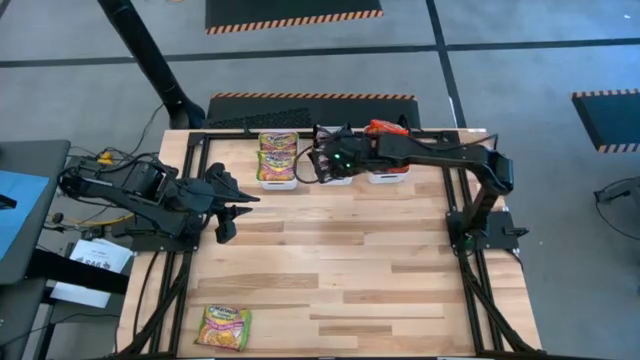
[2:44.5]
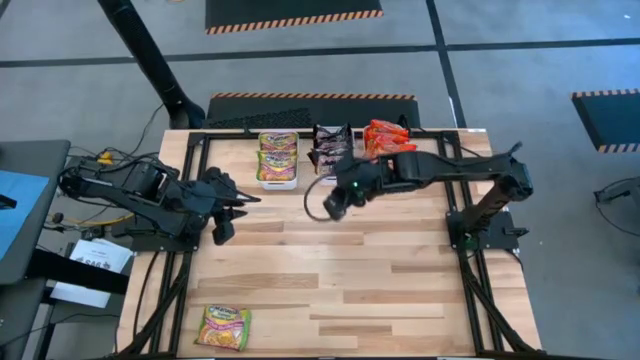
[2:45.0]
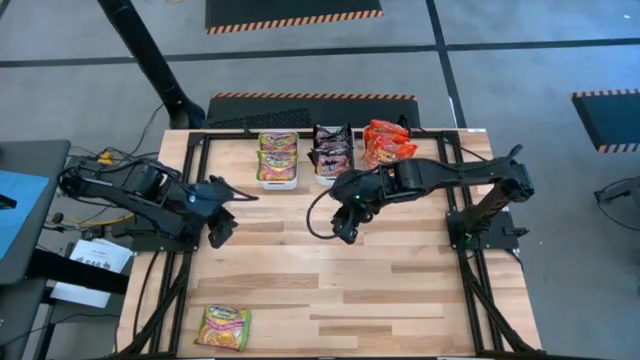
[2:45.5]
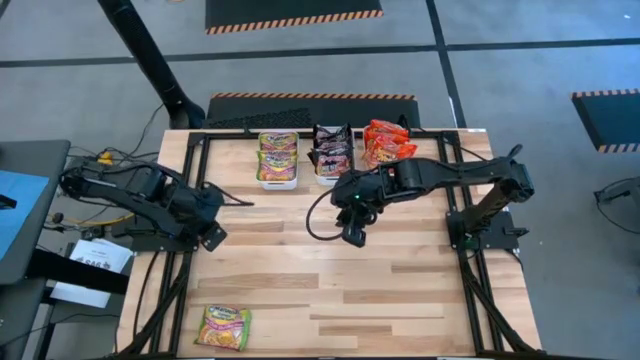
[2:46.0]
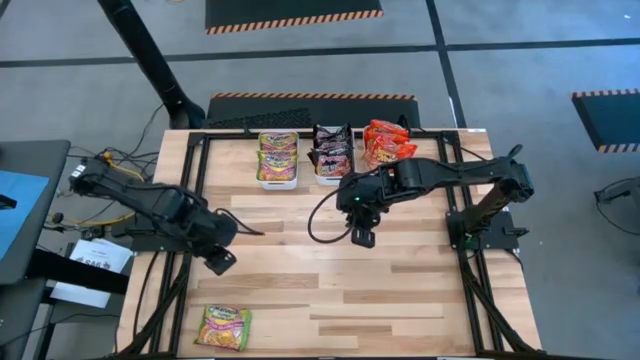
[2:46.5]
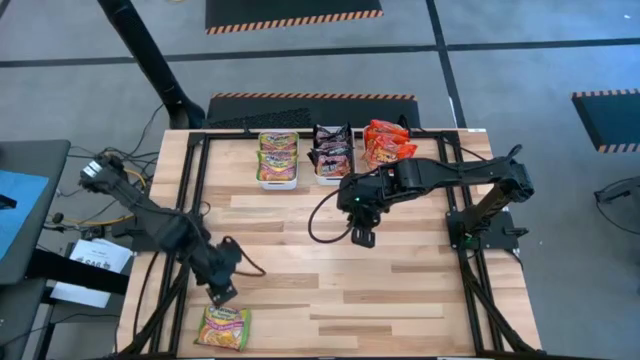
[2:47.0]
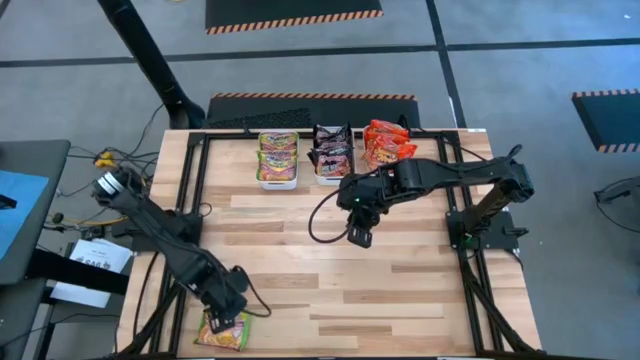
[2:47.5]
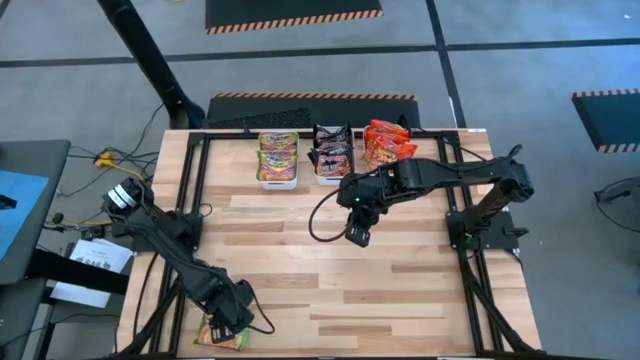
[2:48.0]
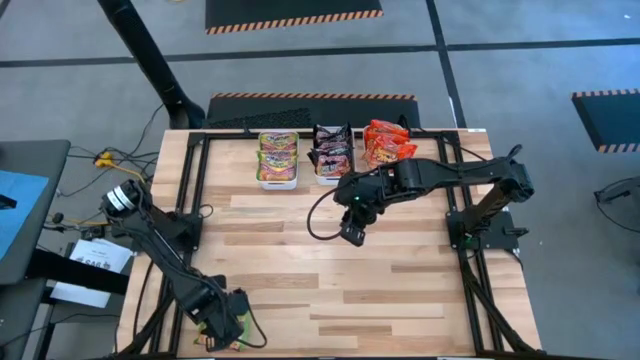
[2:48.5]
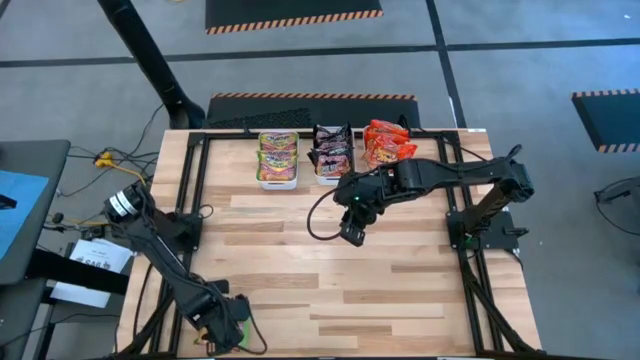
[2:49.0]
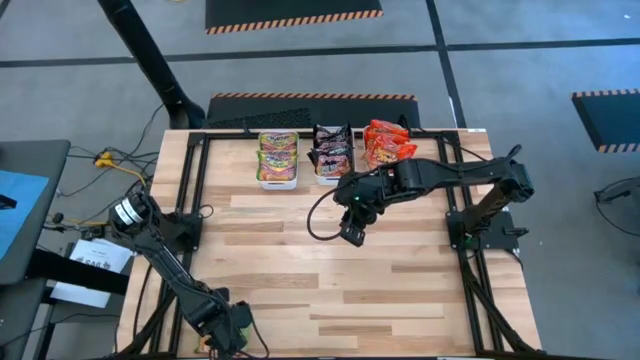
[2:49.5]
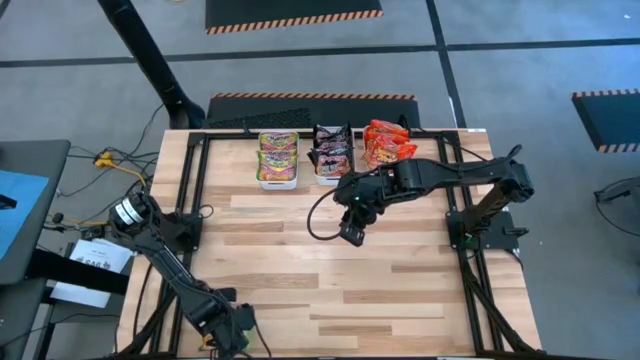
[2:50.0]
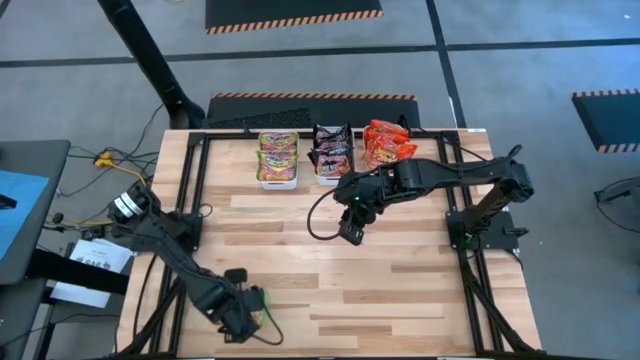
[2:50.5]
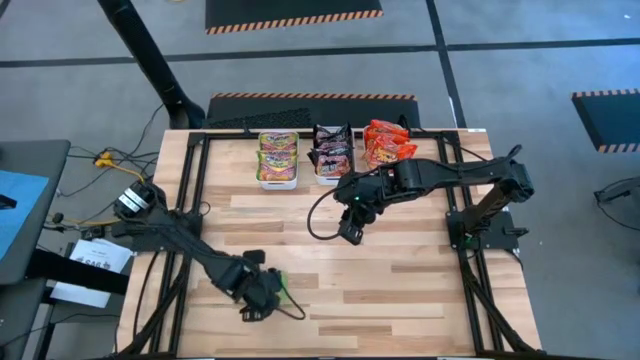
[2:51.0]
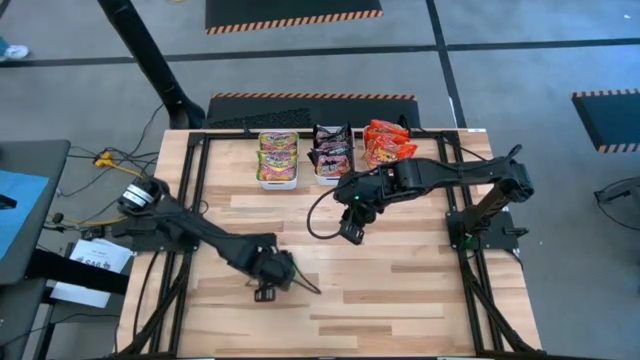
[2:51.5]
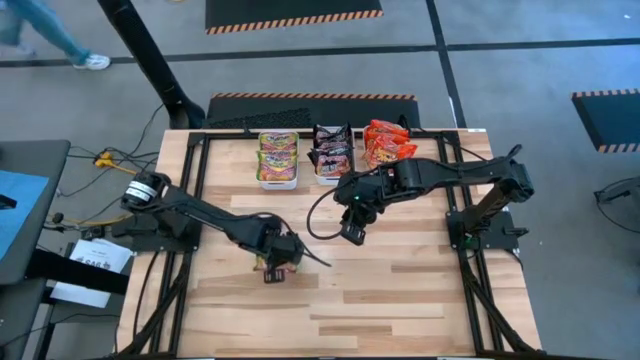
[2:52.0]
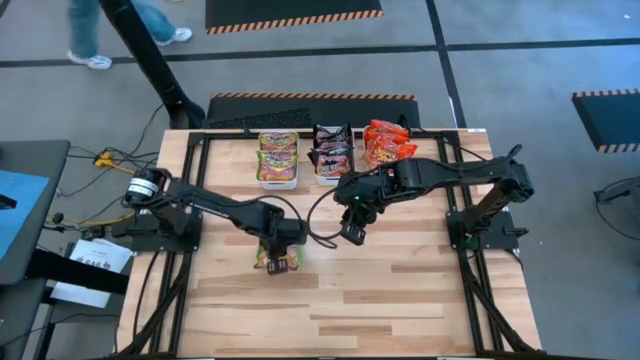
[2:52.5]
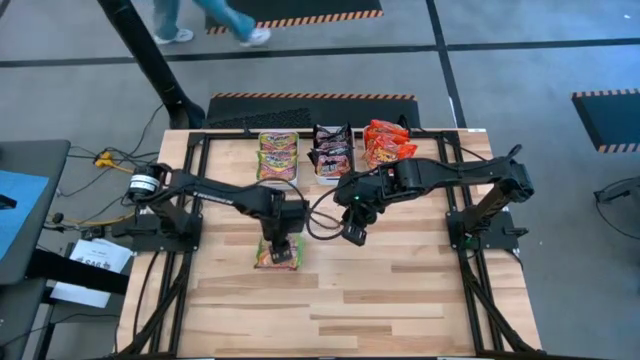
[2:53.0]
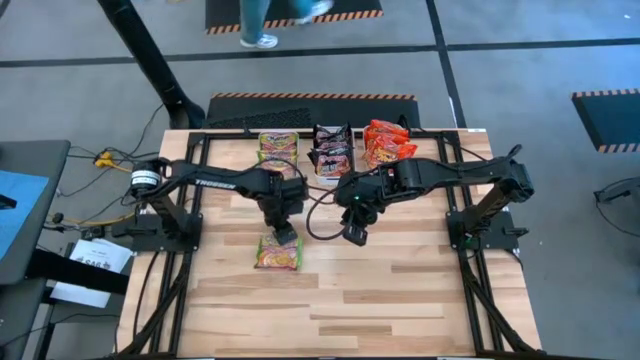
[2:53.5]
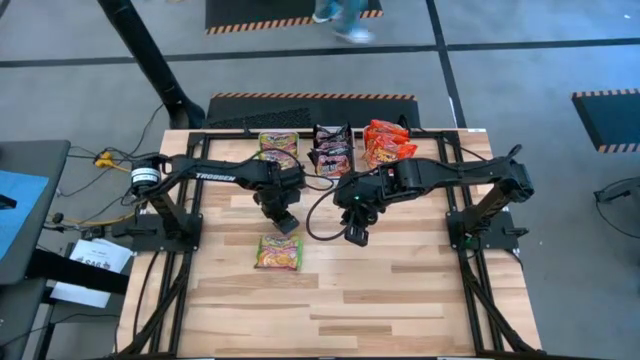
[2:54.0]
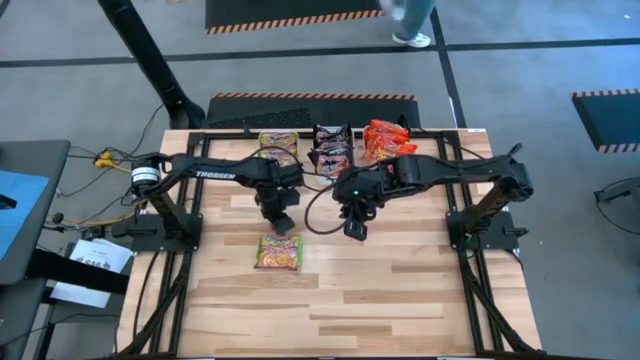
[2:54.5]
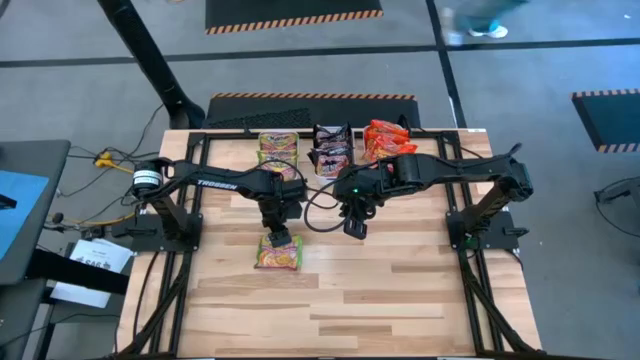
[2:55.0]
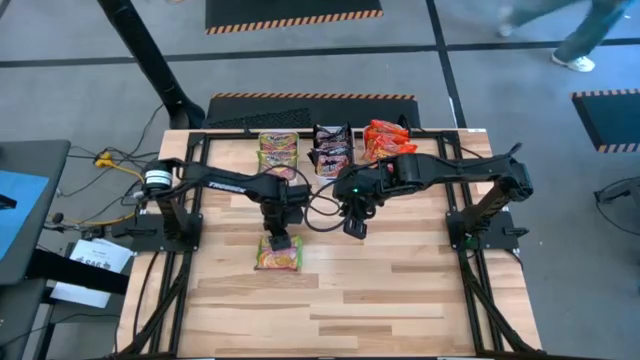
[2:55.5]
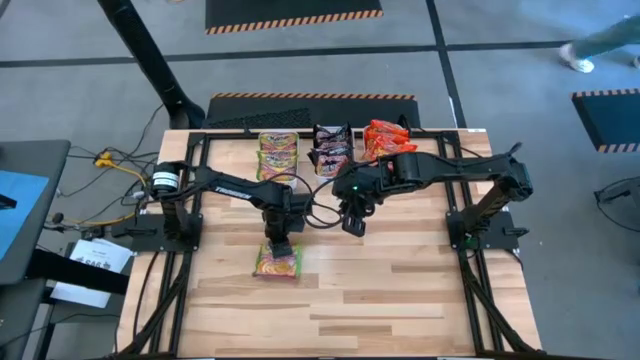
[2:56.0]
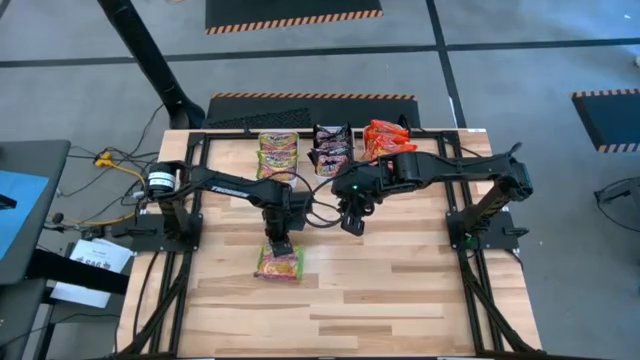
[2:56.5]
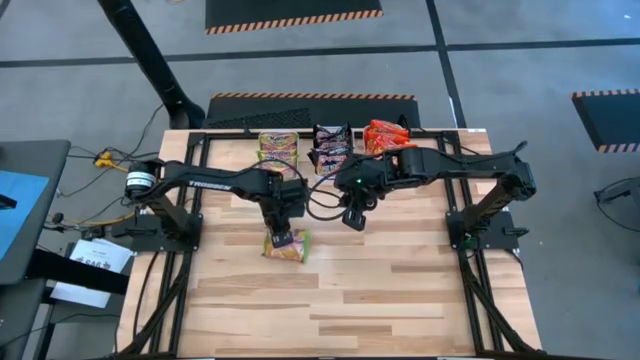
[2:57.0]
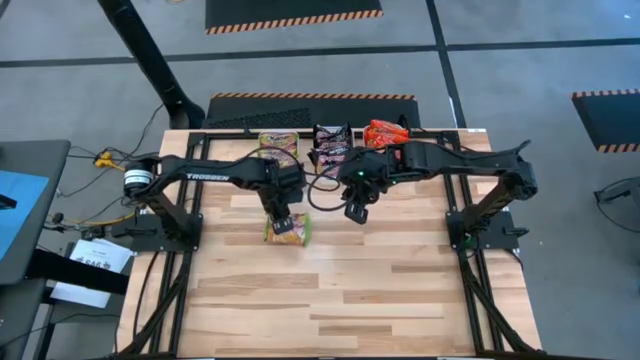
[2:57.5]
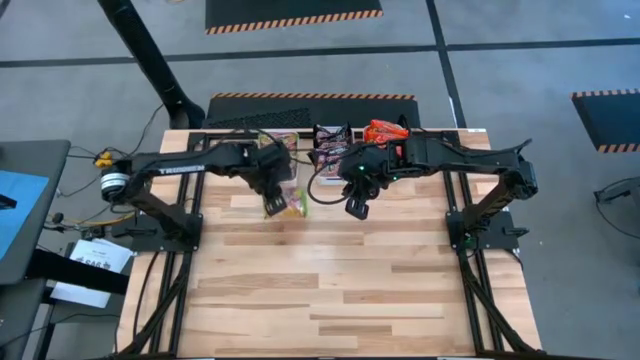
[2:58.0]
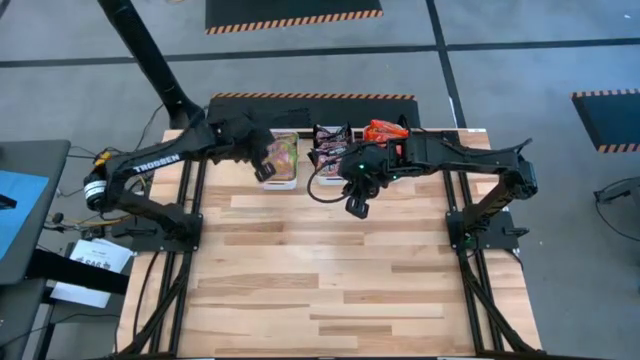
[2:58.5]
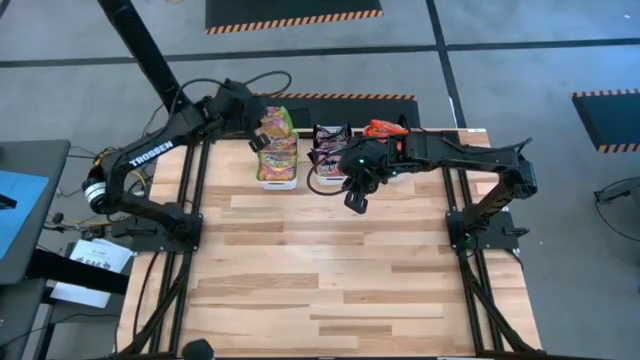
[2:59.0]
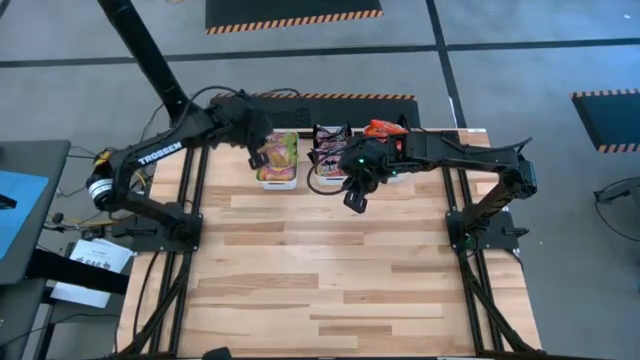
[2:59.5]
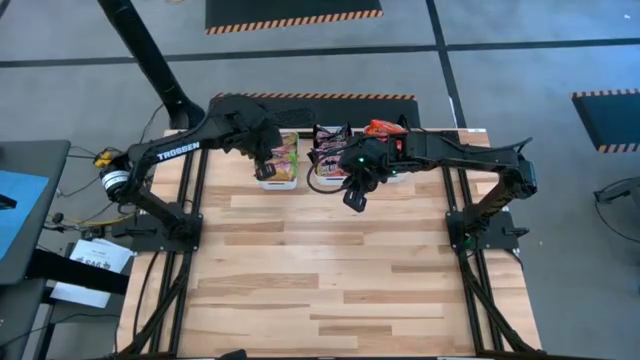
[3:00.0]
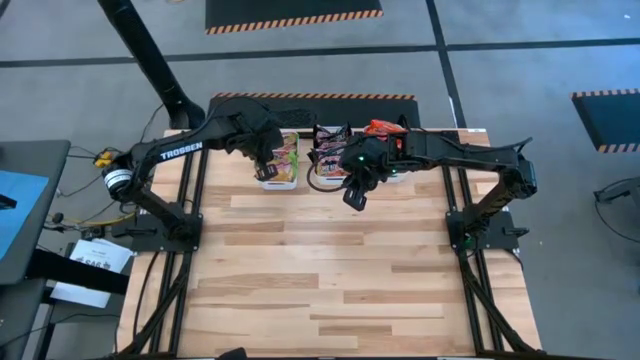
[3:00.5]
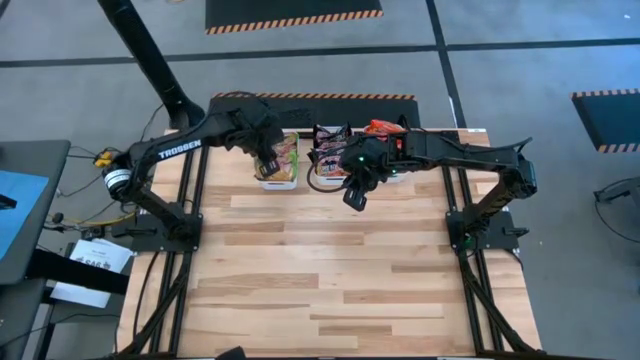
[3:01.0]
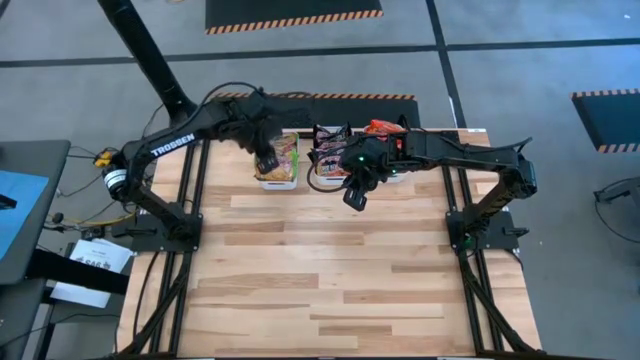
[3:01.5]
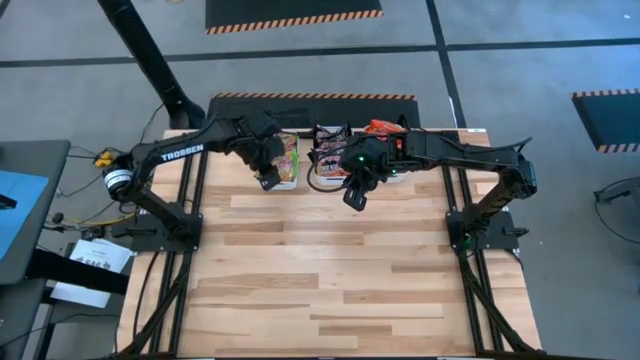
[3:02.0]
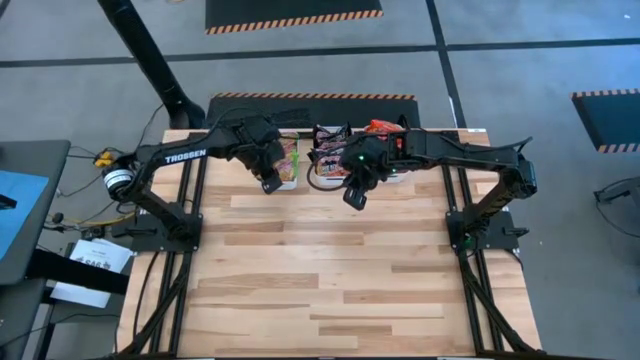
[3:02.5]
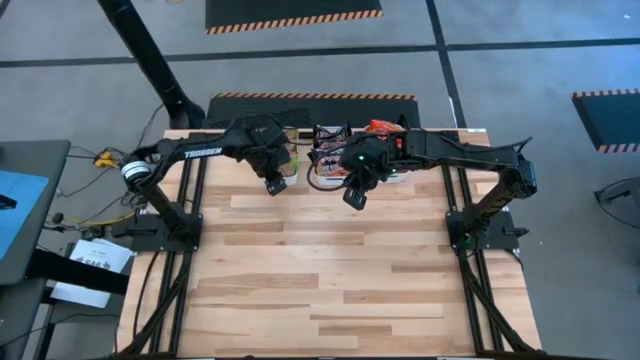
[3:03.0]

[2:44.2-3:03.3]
Task: Sort Maruchan noodles
Put the green noodle pack into the left white bin
